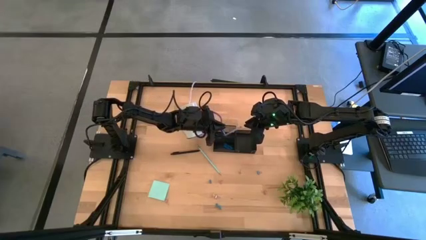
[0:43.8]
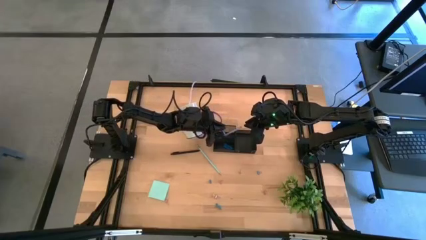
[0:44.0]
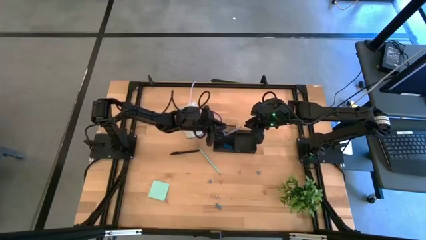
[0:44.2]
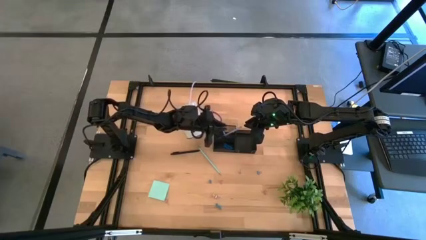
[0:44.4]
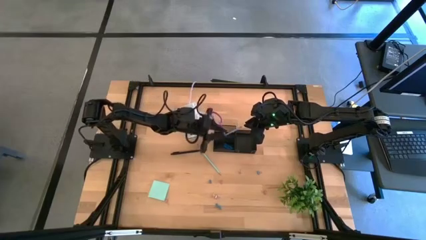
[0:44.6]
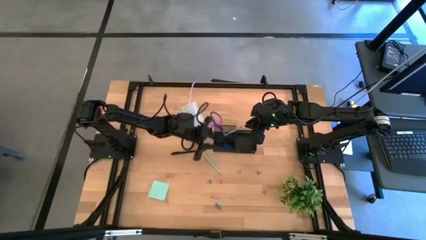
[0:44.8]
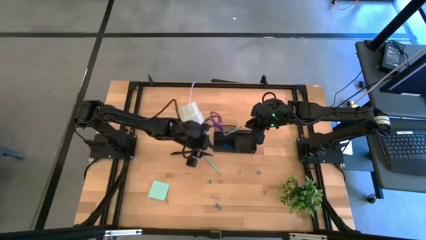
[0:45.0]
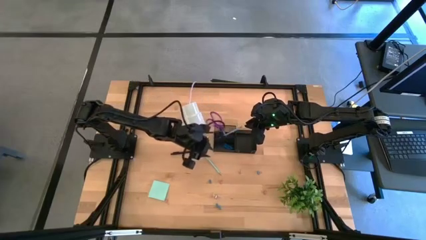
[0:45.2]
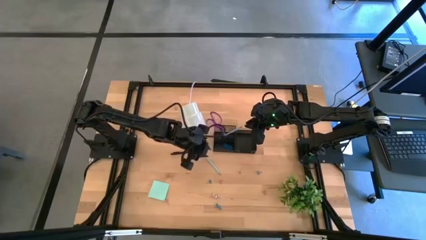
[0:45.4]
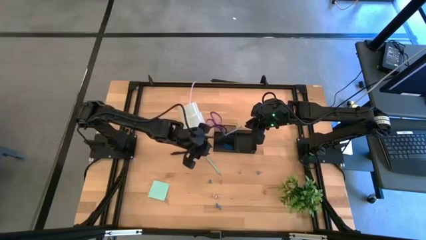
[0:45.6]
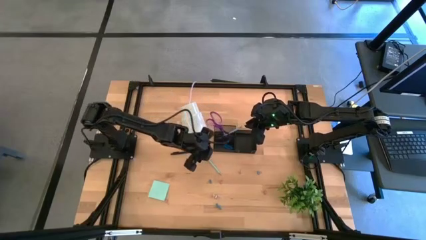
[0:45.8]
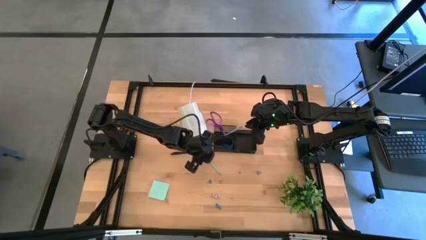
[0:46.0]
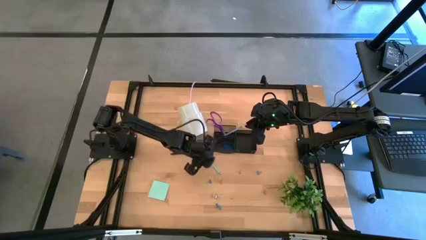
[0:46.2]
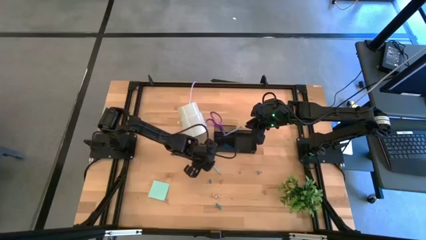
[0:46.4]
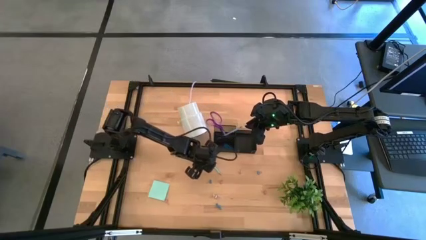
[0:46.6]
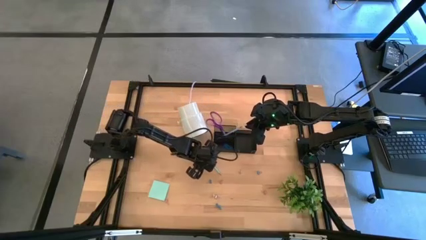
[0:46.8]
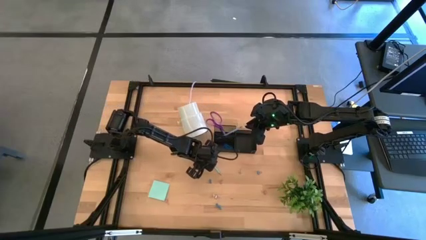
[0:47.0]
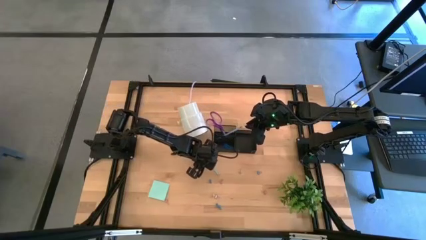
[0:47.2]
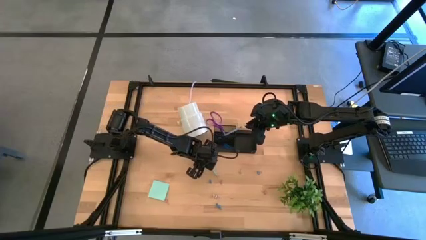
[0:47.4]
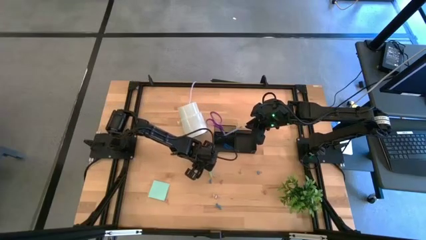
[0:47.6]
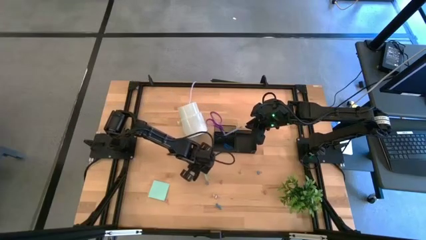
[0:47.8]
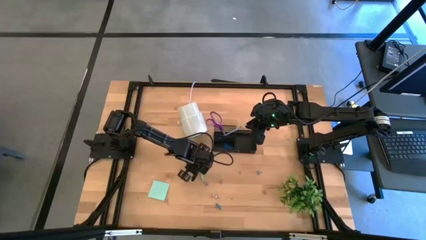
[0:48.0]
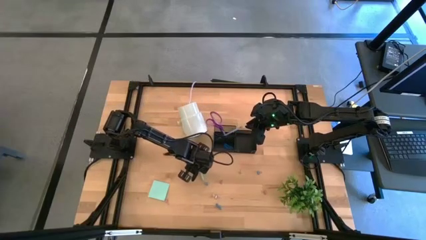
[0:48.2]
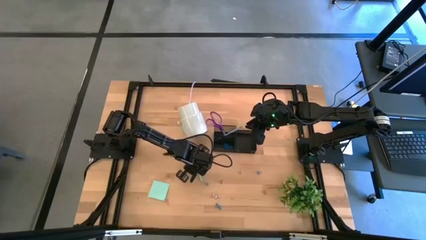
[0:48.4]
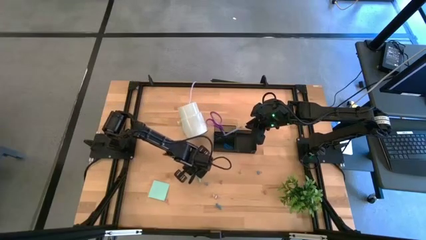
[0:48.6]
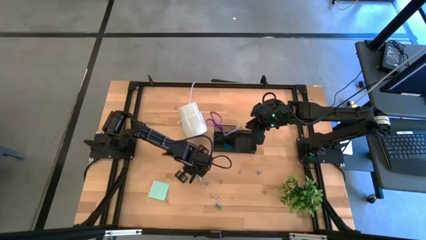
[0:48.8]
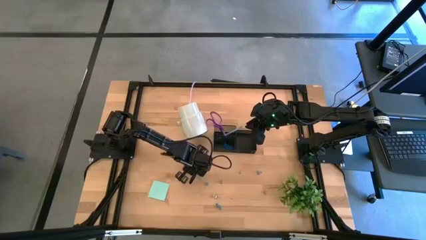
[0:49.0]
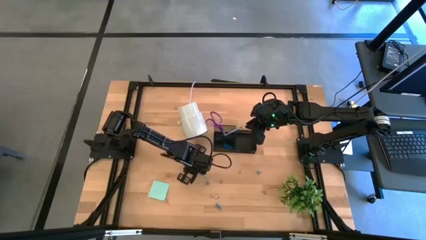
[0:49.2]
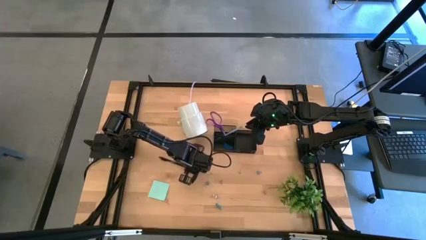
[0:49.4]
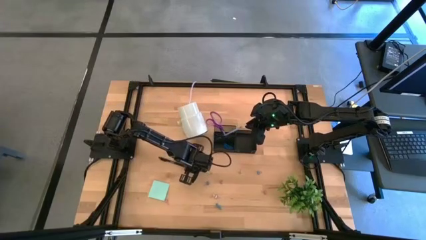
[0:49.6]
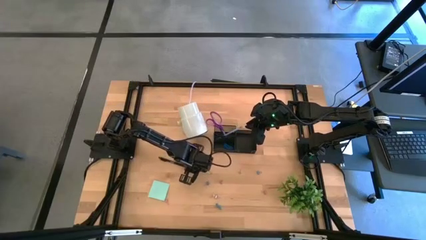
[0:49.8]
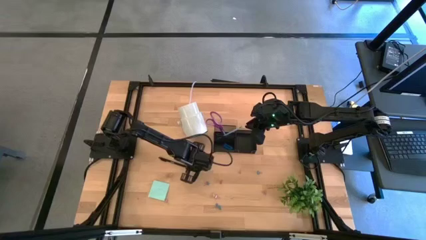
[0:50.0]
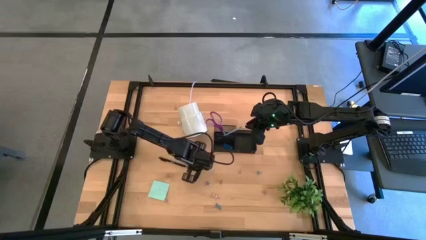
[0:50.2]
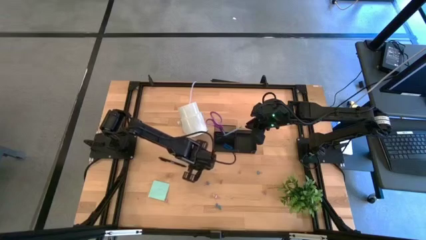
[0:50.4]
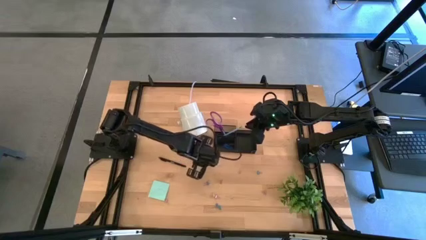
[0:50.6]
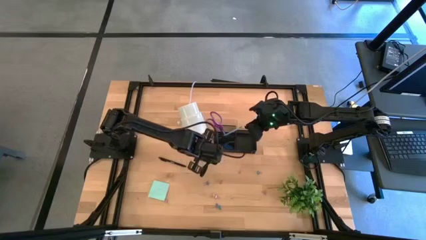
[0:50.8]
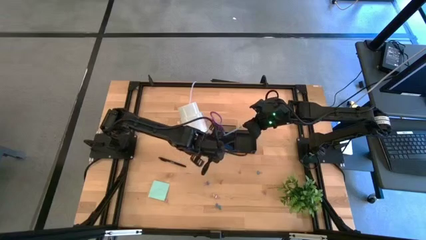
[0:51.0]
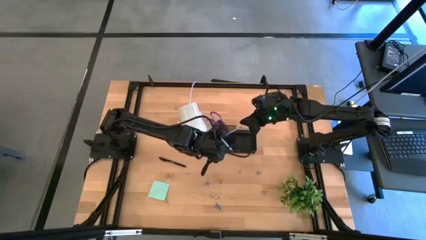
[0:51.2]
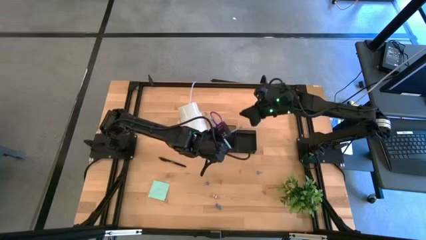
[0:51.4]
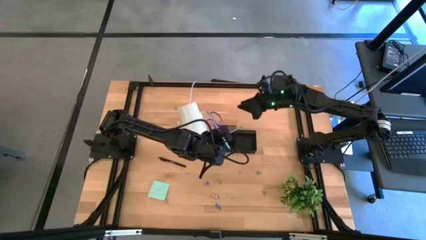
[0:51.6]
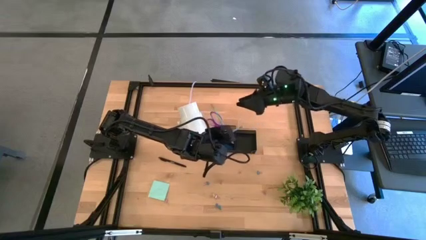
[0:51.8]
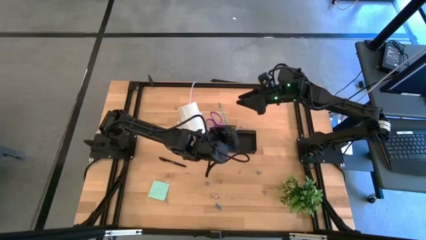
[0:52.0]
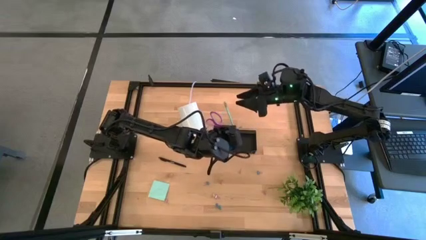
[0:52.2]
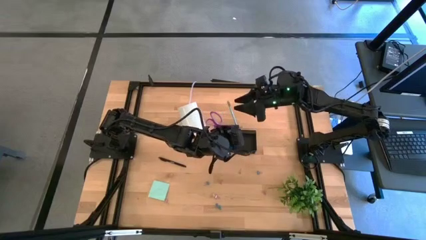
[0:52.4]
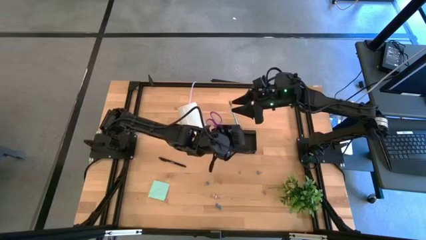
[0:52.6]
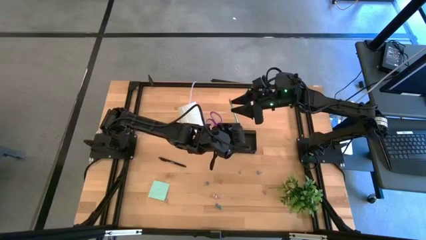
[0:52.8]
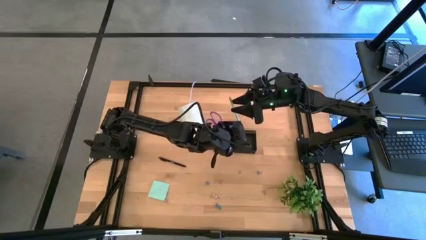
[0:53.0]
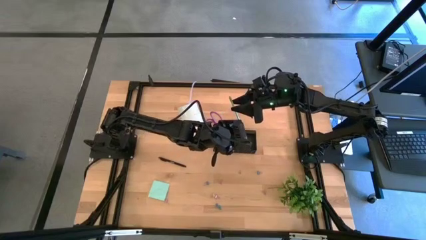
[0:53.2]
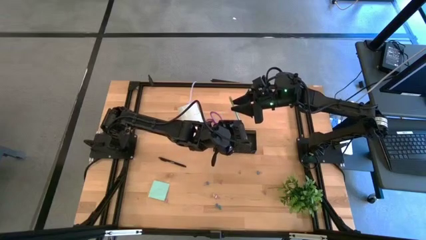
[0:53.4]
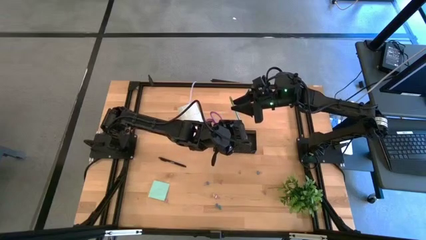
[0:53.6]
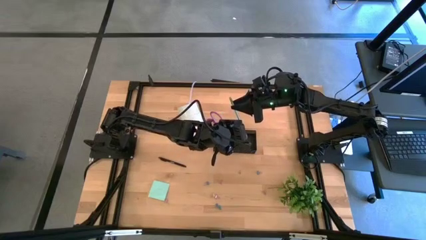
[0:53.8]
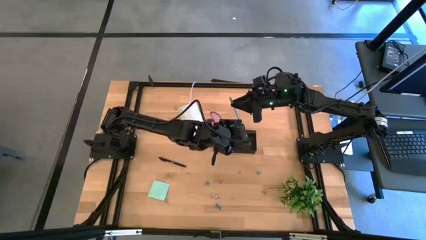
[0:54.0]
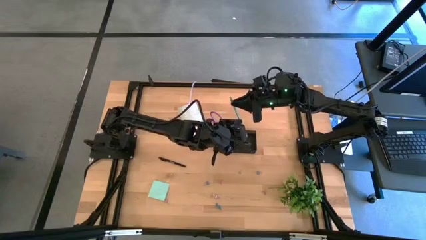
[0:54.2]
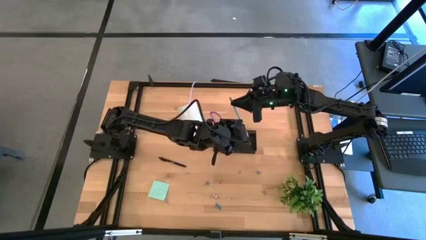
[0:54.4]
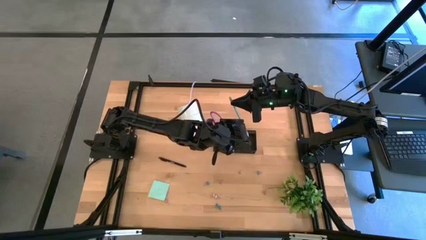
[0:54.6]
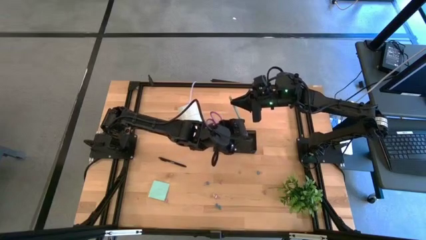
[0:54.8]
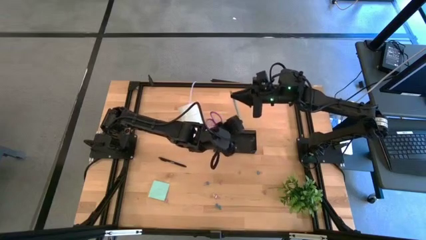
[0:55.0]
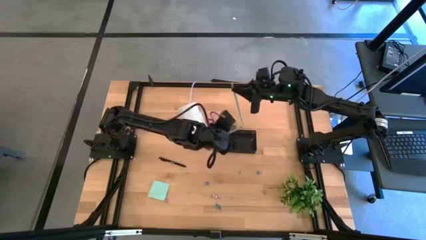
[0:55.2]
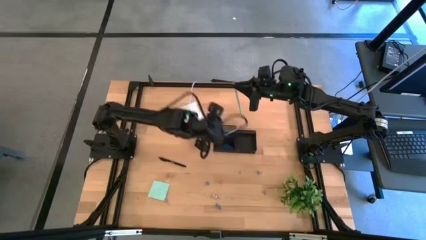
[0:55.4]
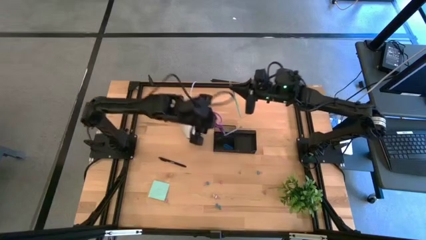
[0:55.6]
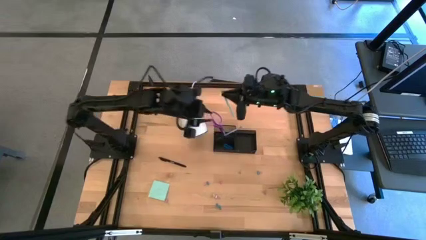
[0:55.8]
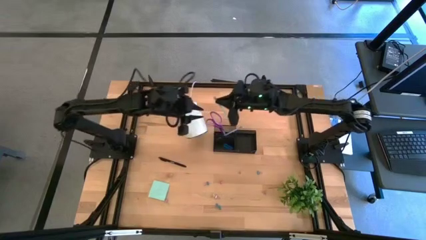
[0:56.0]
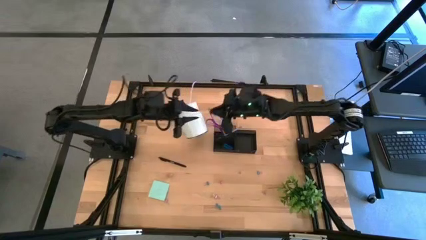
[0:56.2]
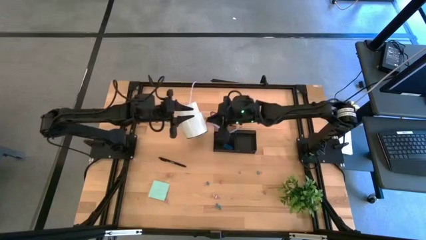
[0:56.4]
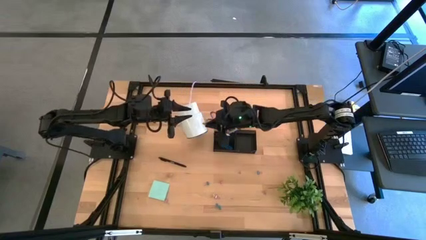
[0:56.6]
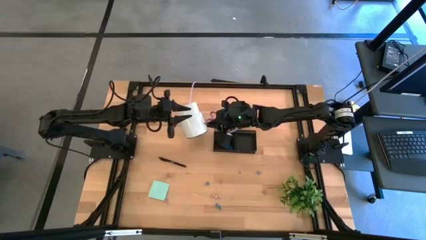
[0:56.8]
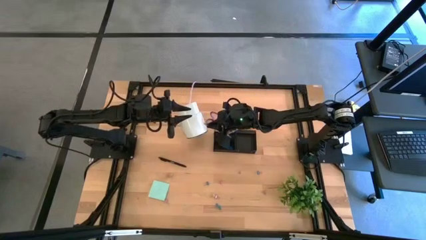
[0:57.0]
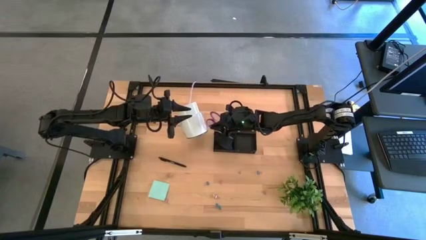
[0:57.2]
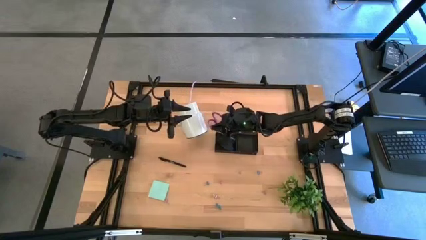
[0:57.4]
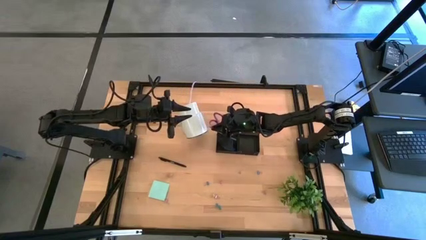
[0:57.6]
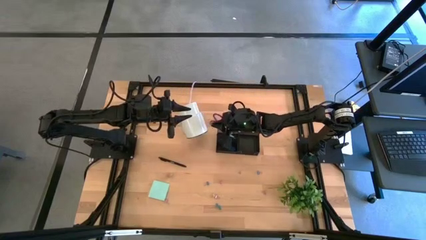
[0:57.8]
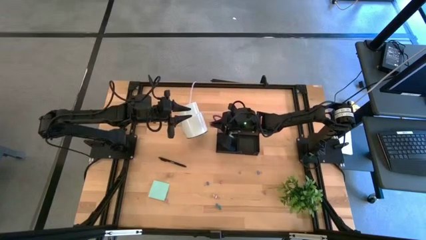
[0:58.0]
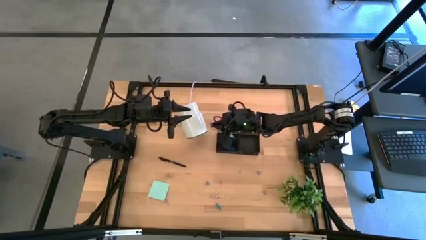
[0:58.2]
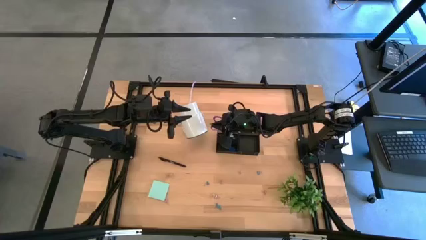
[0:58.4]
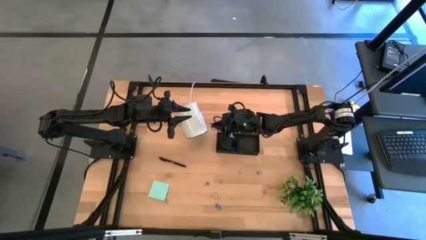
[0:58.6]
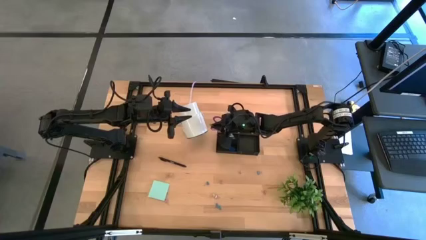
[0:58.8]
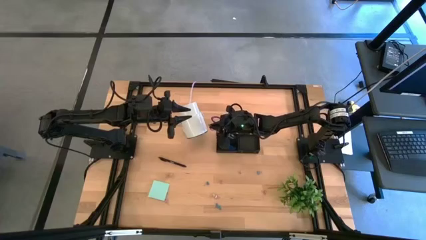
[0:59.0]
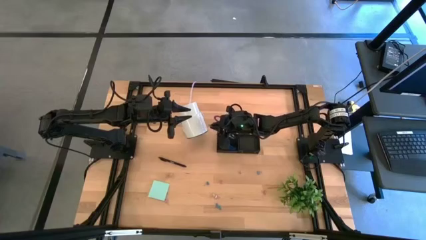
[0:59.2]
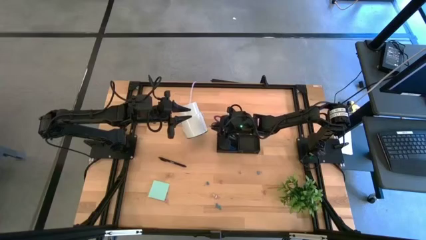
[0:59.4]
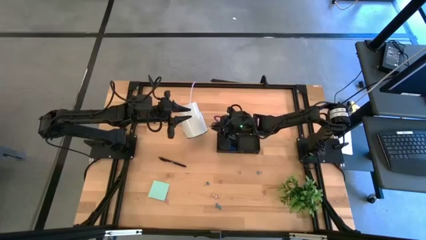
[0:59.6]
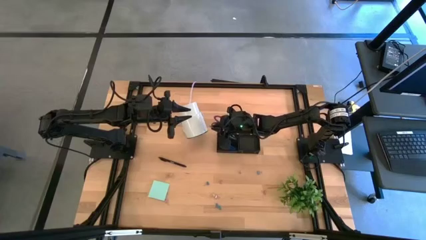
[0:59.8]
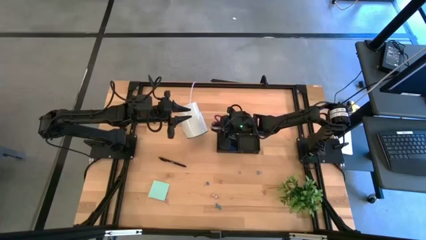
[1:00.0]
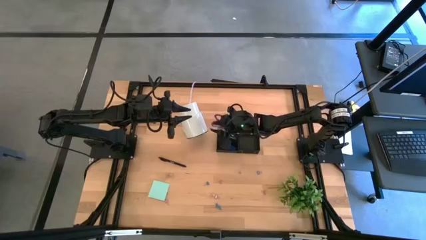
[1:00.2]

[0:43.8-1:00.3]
Task: Pick and place office supplies into organizer
Put the green pencil into the black desk organizer
